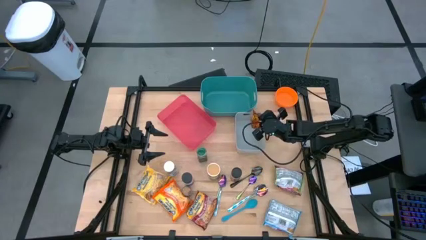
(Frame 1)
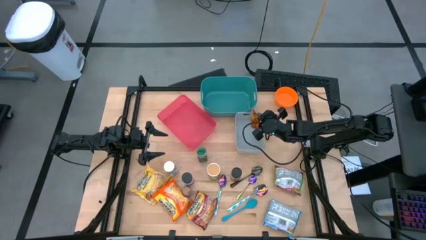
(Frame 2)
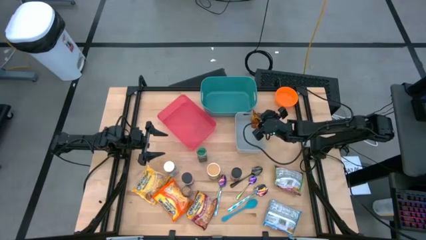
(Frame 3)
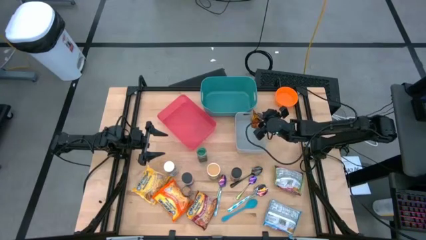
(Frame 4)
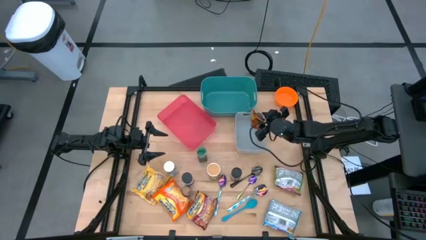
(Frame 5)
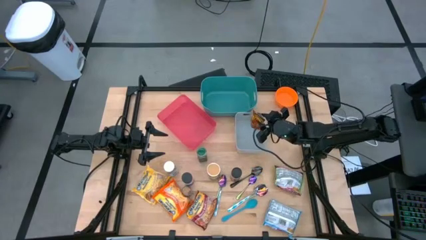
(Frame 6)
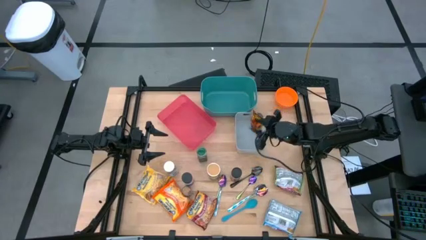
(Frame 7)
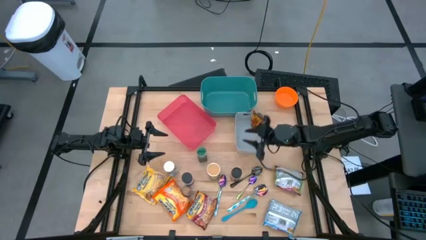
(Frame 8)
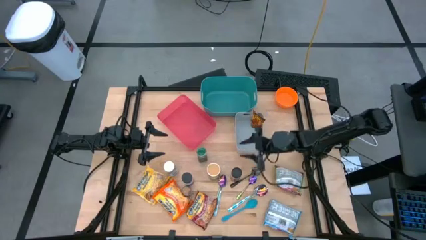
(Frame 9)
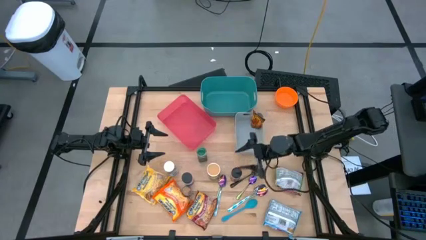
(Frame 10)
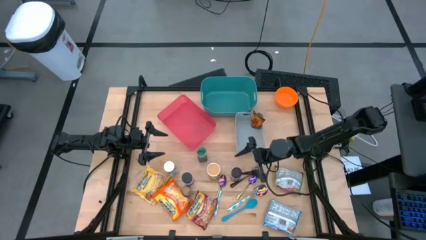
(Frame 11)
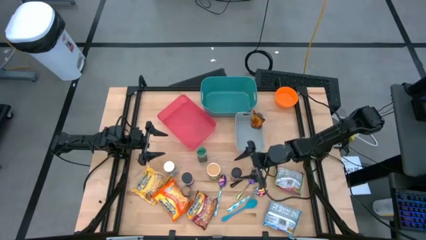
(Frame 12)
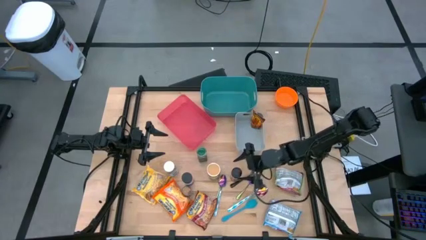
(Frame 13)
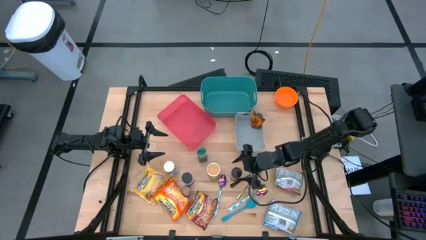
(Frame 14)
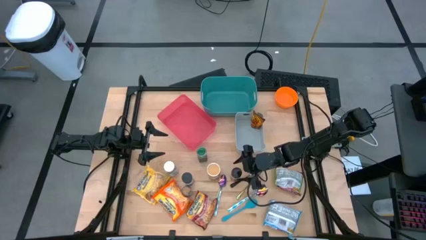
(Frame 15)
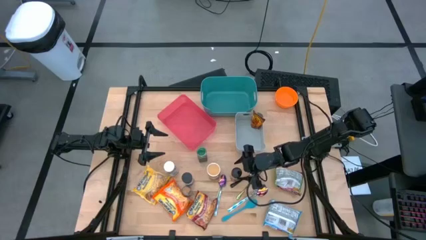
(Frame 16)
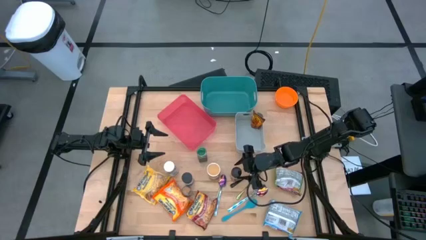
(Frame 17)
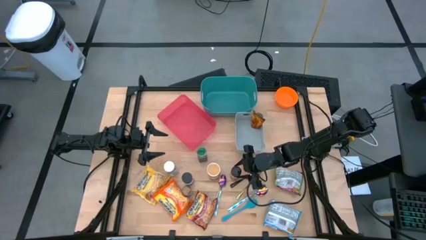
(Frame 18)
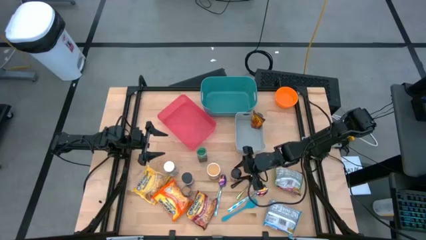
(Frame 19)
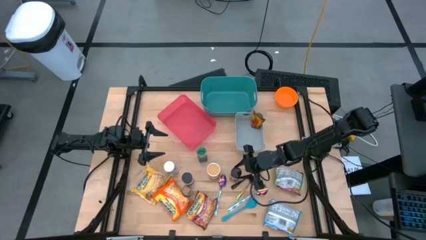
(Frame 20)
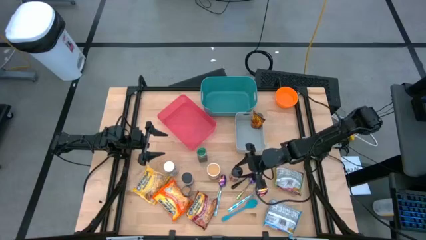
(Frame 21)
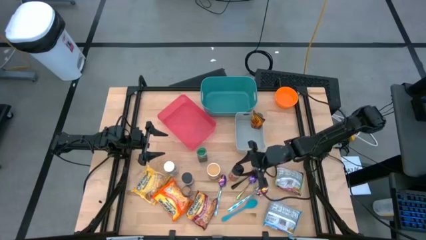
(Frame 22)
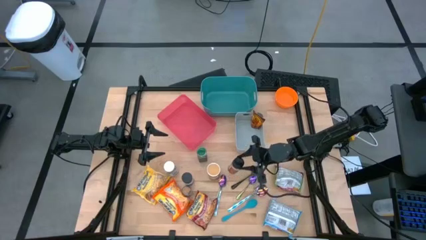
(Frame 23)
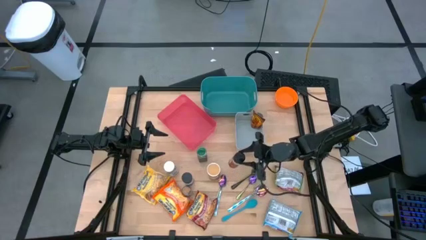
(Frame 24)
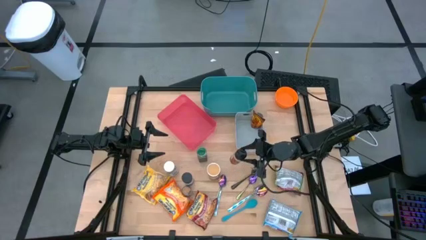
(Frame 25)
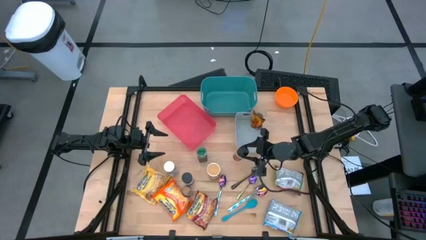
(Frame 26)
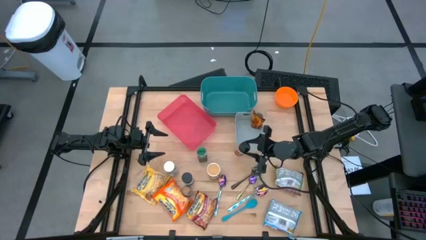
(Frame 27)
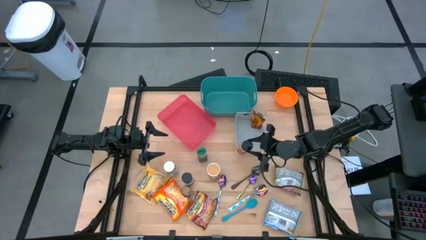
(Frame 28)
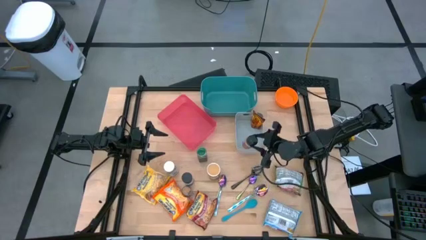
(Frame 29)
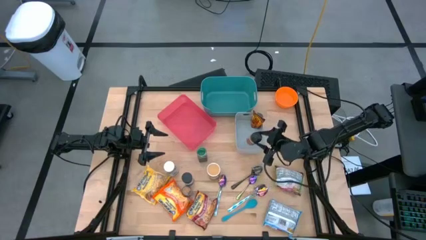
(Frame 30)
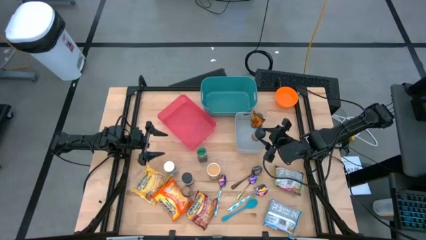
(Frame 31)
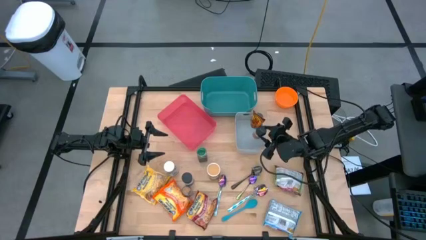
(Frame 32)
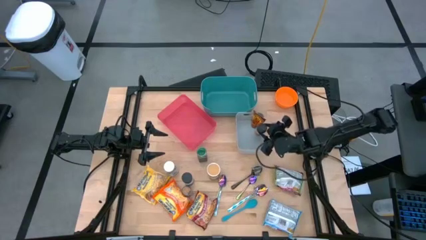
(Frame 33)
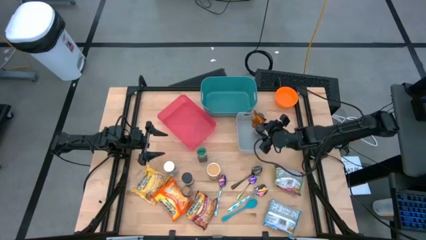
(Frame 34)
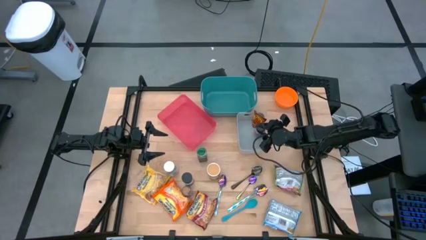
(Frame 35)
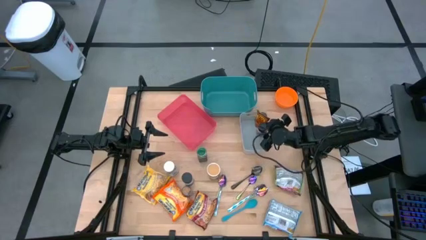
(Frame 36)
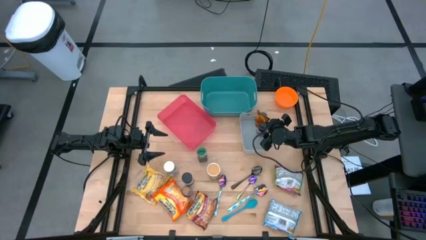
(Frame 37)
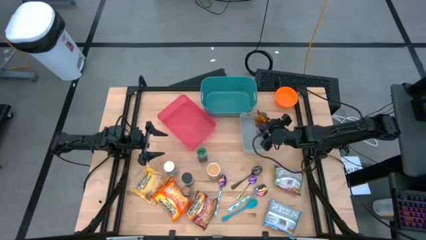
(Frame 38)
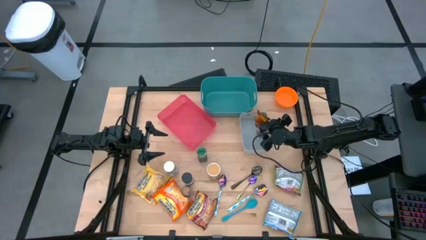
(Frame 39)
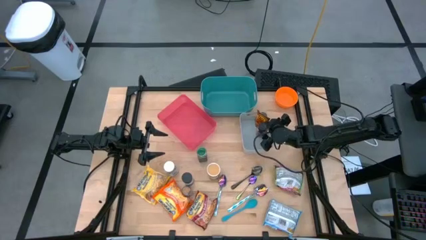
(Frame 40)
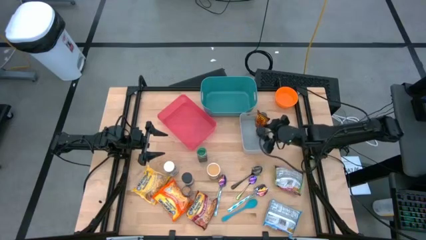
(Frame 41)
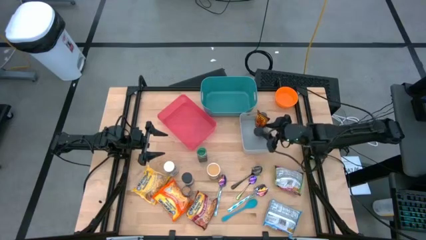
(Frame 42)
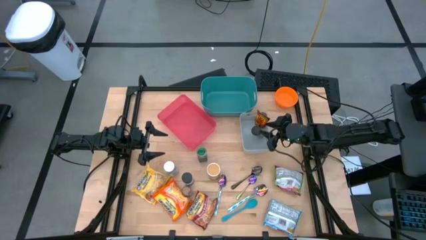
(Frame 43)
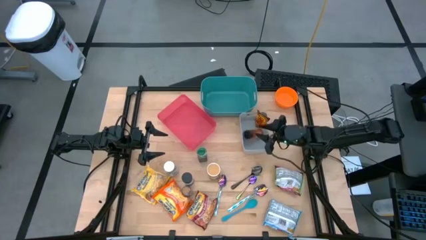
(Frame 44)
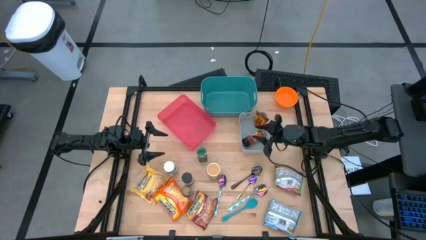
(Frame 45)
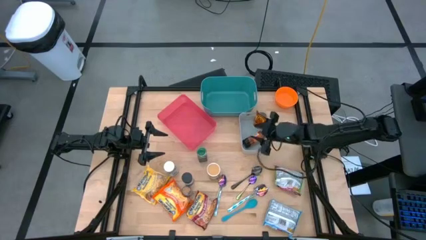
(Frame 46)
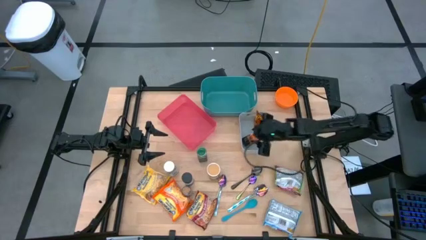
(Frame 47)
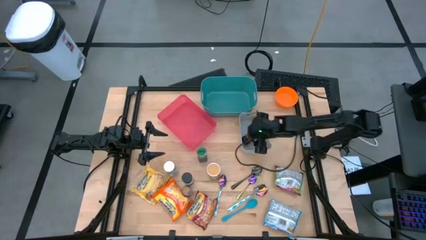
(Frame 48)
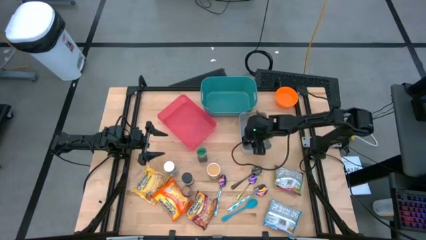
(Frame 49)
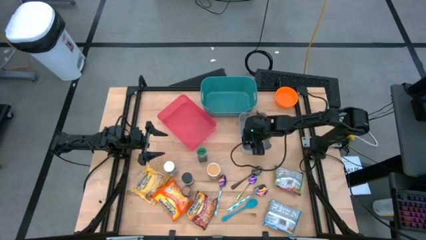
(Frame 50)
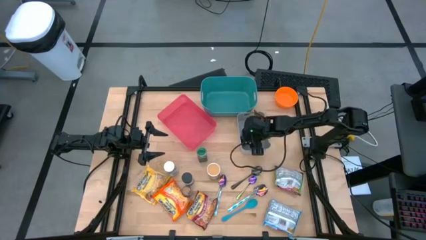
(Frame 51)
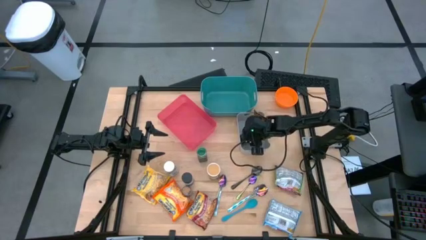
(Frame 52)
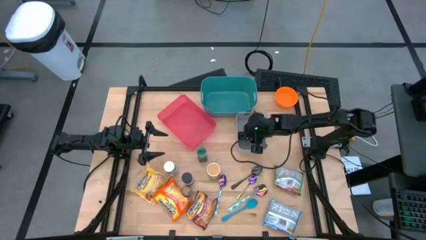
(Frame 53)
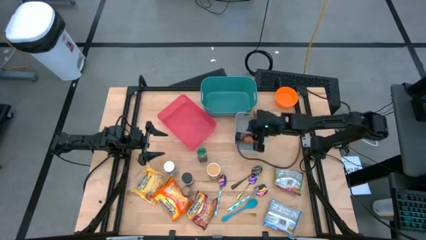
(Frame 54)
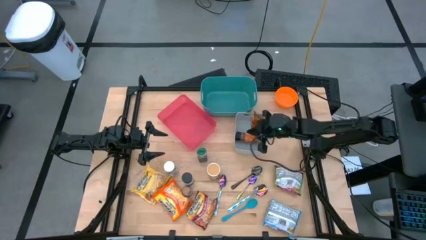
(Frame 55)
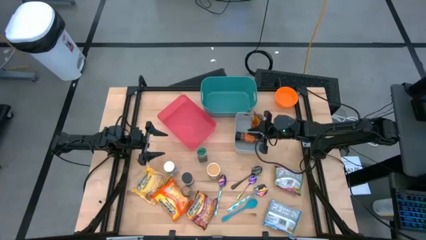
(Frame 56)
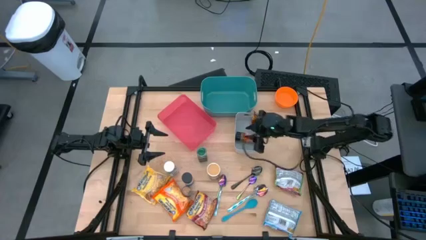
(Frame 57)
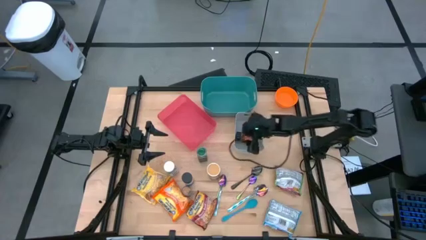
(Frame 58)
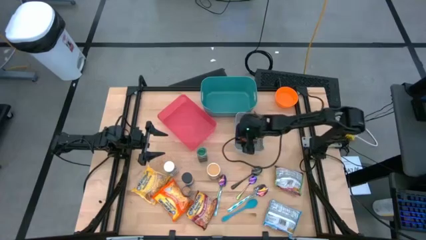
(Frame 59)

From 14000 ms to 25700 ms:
Task: Pick & Place Food Item
Put the orange spice bottle into the gray bin
